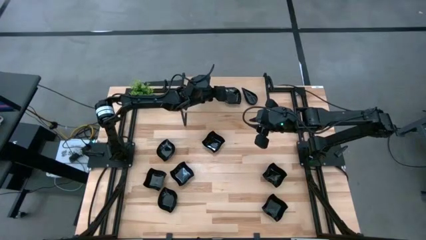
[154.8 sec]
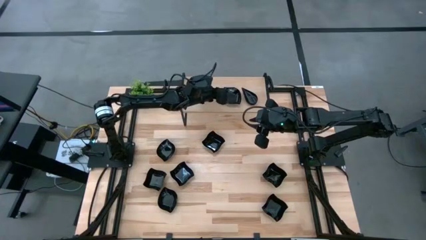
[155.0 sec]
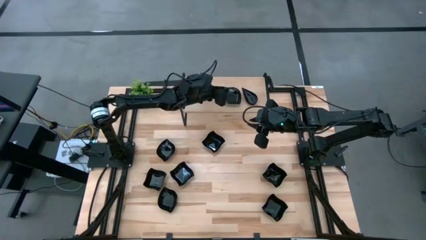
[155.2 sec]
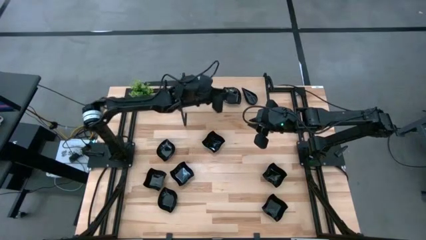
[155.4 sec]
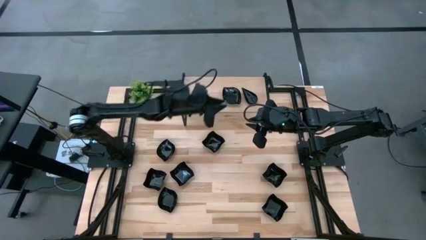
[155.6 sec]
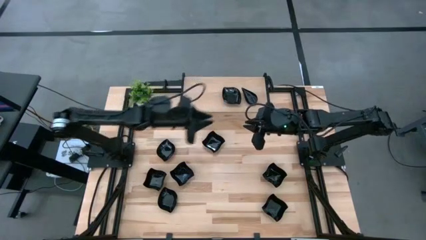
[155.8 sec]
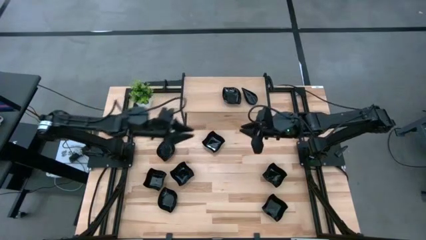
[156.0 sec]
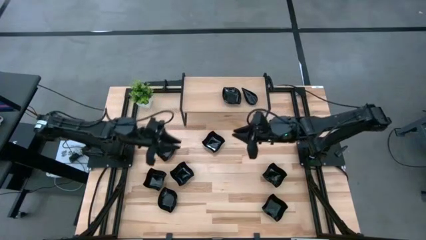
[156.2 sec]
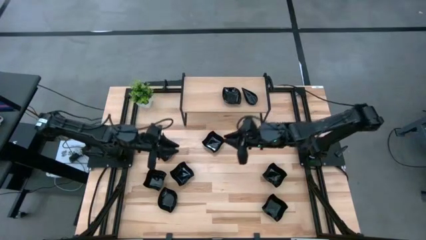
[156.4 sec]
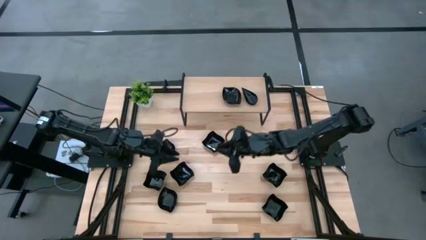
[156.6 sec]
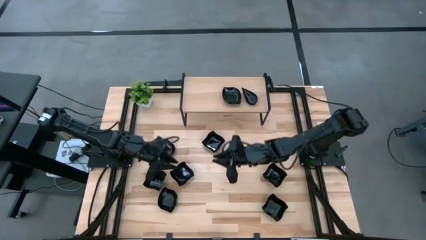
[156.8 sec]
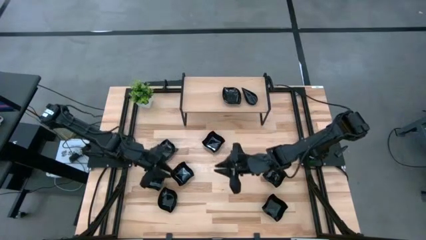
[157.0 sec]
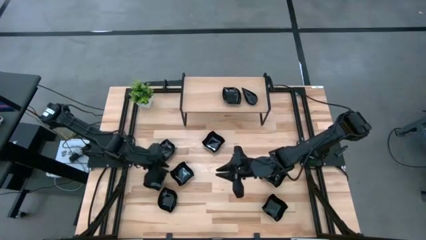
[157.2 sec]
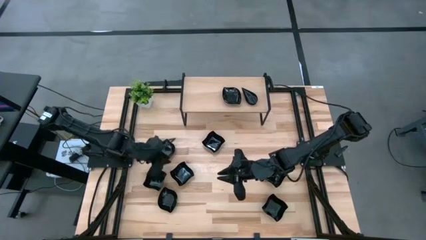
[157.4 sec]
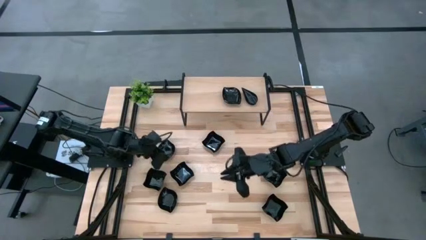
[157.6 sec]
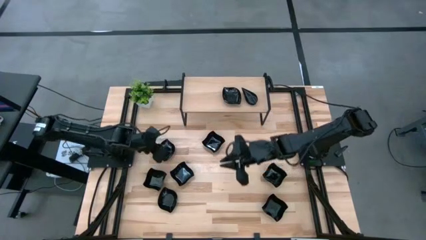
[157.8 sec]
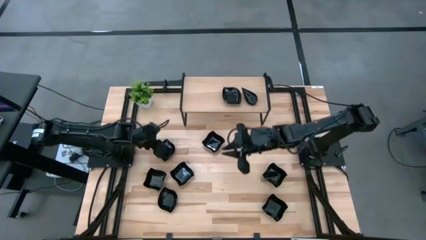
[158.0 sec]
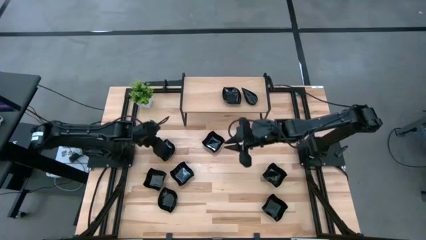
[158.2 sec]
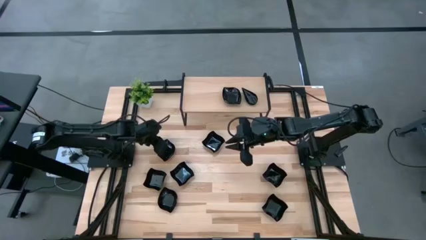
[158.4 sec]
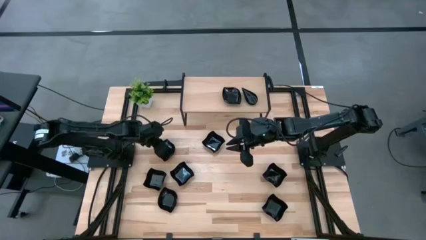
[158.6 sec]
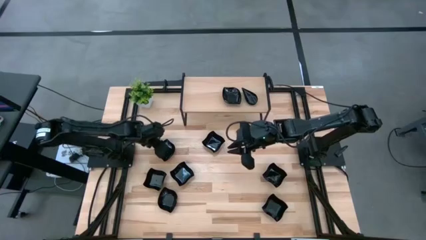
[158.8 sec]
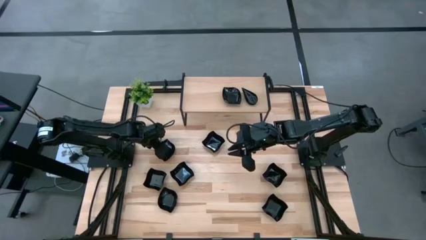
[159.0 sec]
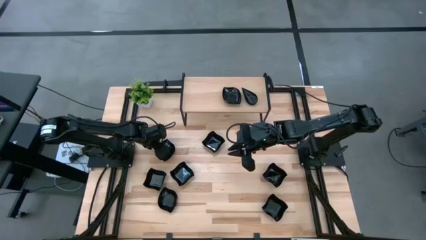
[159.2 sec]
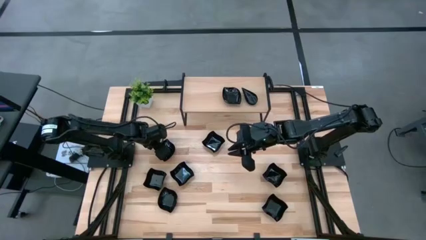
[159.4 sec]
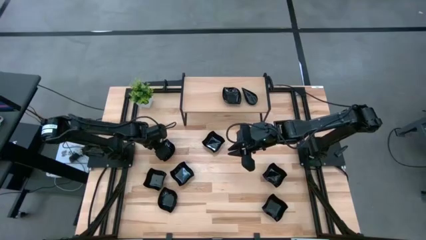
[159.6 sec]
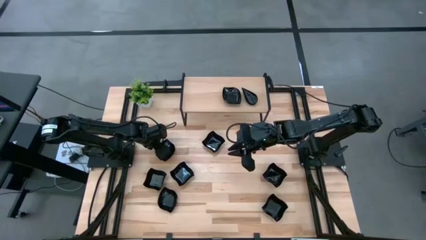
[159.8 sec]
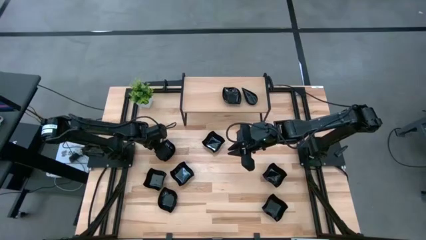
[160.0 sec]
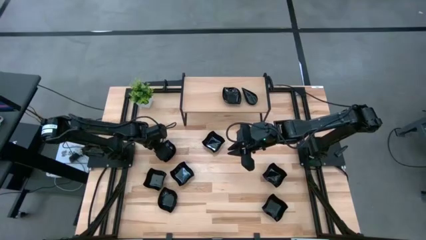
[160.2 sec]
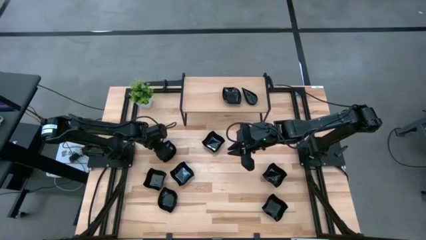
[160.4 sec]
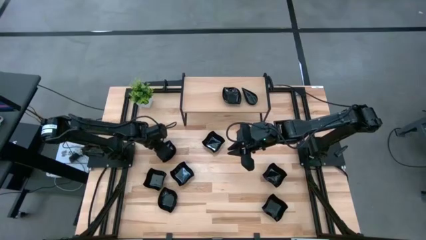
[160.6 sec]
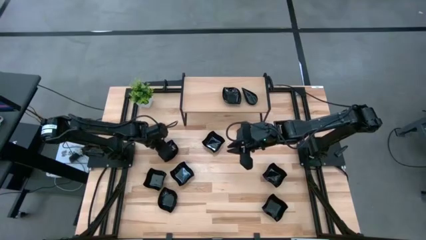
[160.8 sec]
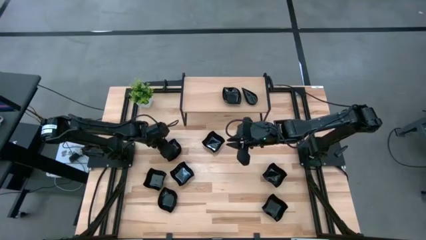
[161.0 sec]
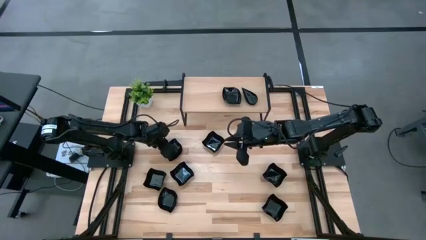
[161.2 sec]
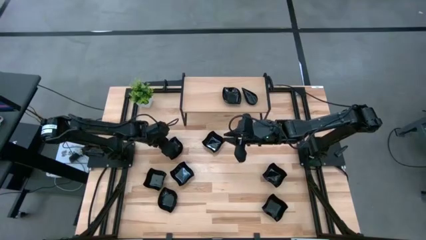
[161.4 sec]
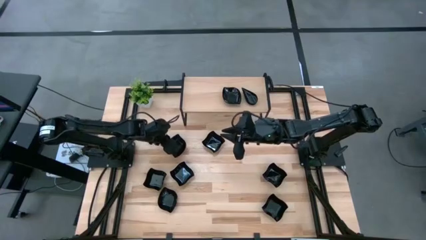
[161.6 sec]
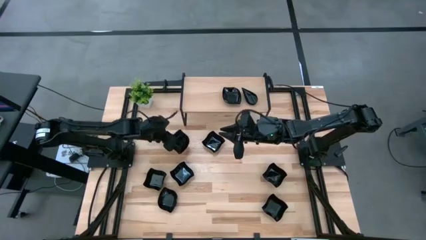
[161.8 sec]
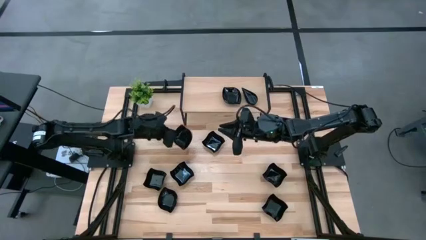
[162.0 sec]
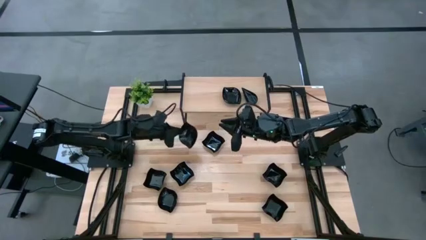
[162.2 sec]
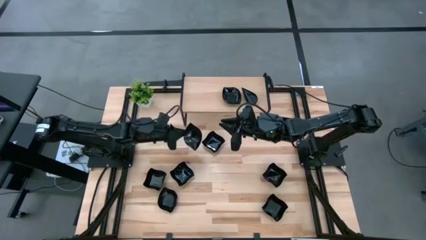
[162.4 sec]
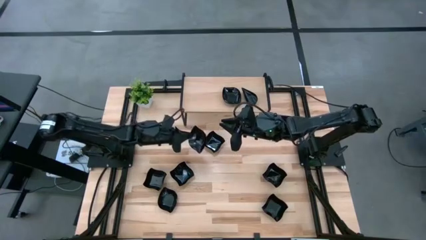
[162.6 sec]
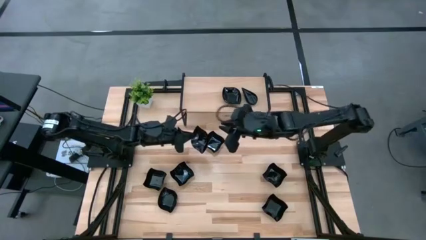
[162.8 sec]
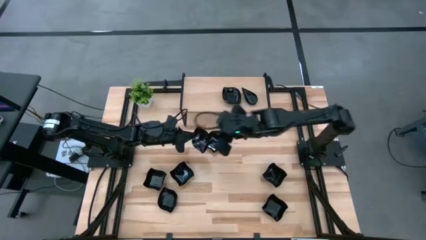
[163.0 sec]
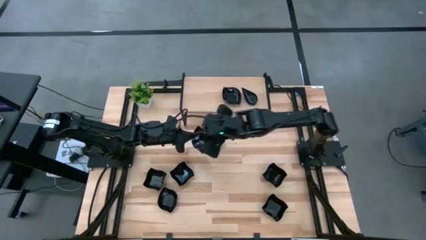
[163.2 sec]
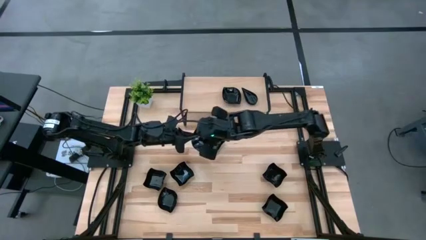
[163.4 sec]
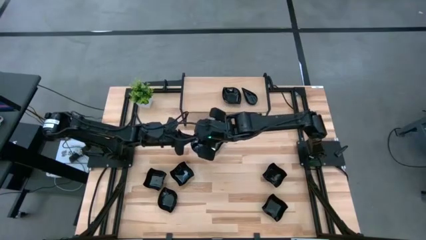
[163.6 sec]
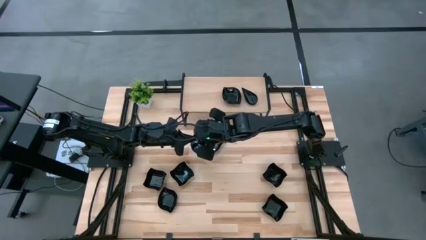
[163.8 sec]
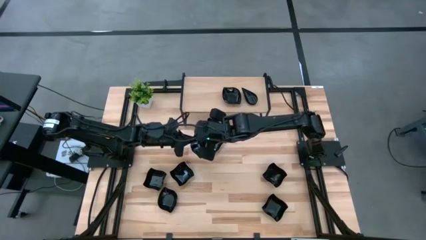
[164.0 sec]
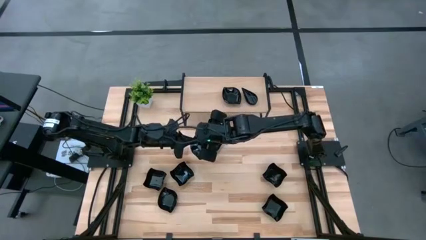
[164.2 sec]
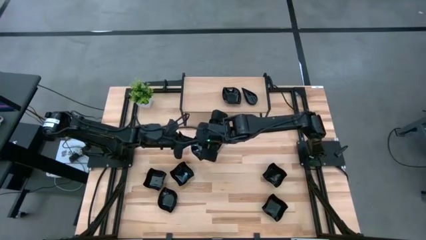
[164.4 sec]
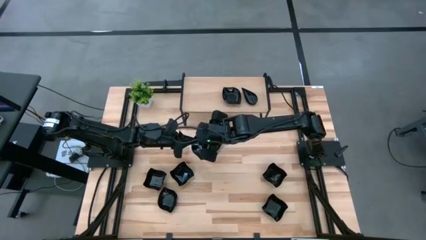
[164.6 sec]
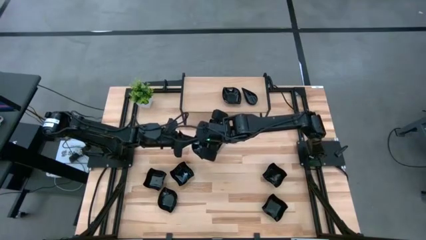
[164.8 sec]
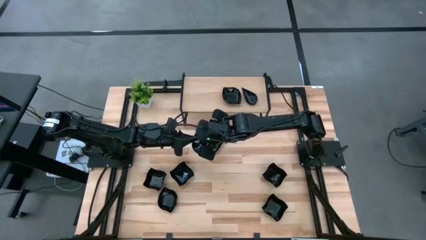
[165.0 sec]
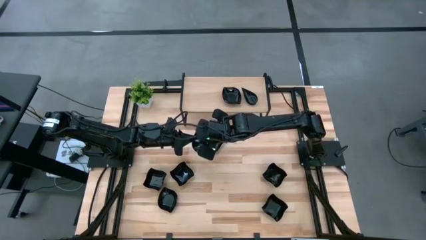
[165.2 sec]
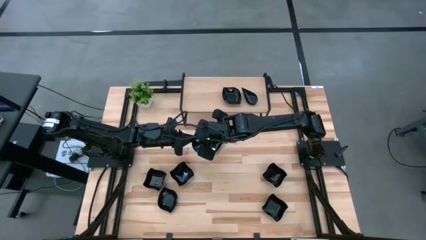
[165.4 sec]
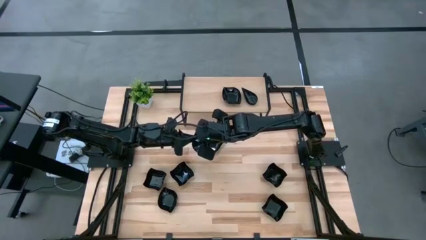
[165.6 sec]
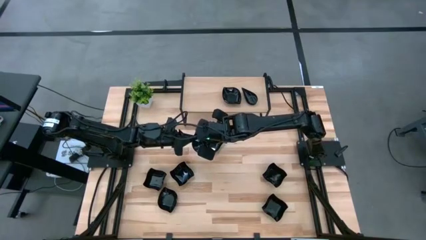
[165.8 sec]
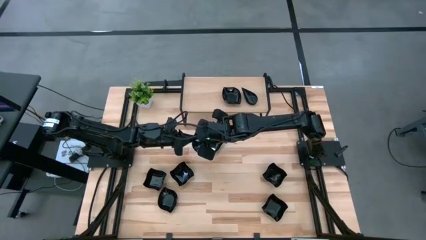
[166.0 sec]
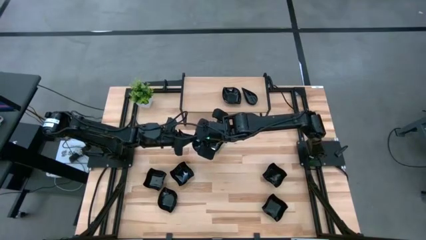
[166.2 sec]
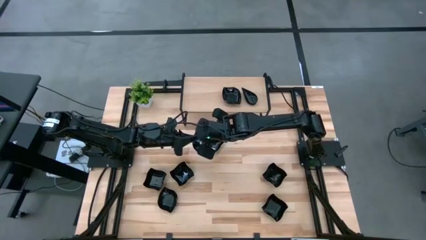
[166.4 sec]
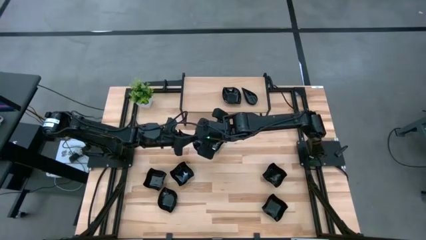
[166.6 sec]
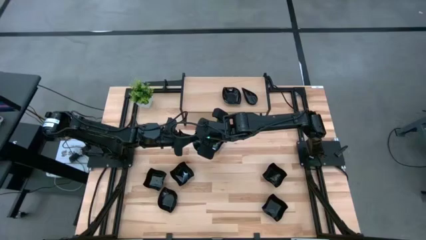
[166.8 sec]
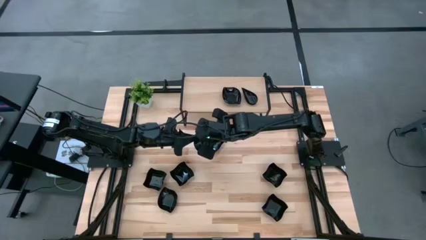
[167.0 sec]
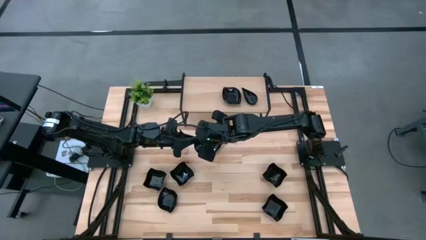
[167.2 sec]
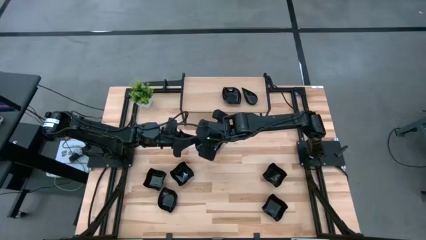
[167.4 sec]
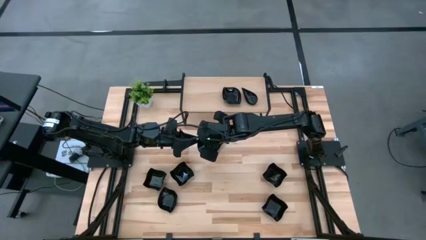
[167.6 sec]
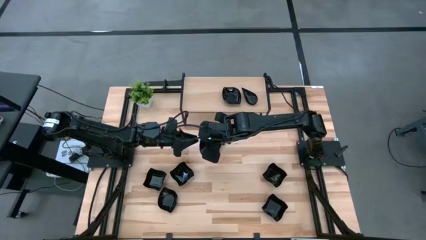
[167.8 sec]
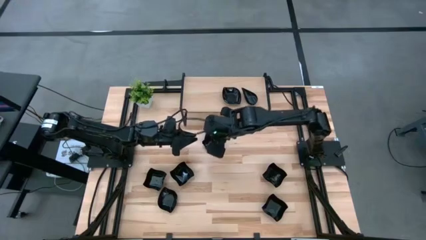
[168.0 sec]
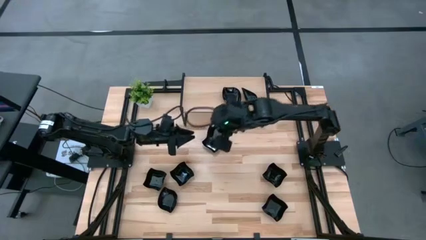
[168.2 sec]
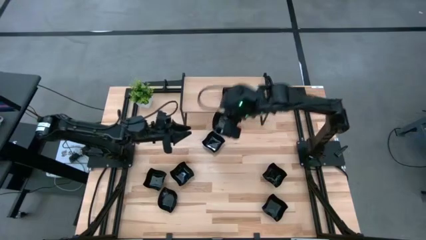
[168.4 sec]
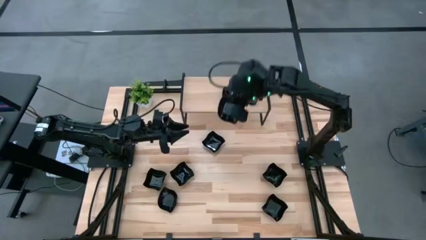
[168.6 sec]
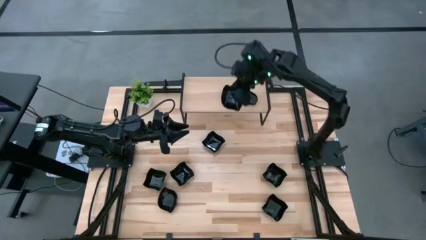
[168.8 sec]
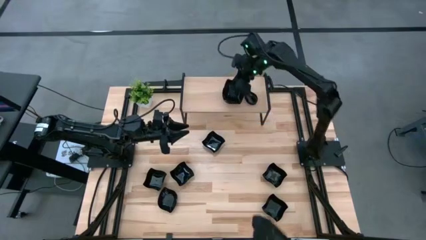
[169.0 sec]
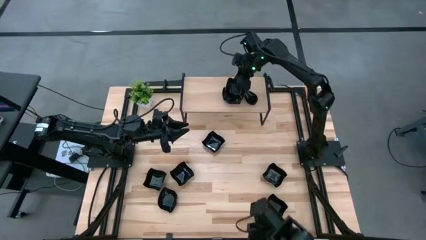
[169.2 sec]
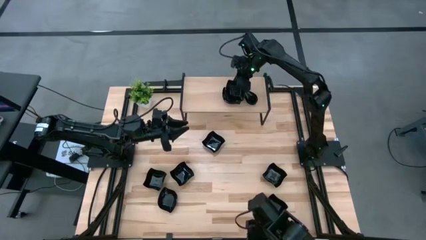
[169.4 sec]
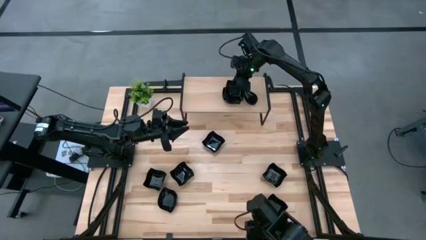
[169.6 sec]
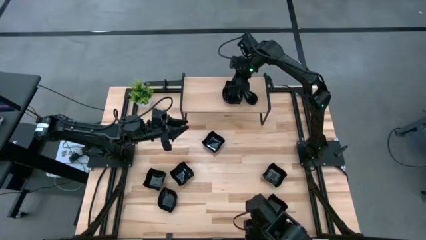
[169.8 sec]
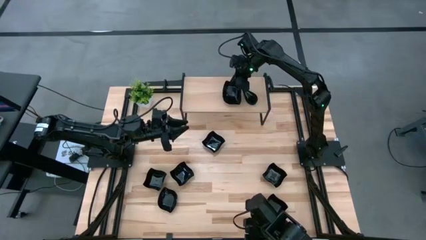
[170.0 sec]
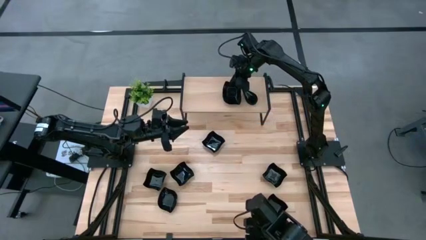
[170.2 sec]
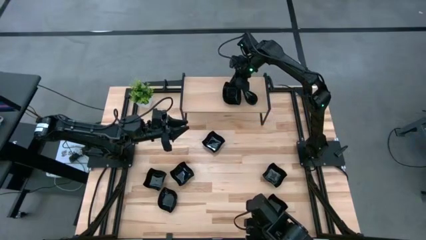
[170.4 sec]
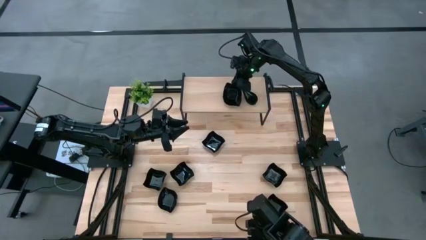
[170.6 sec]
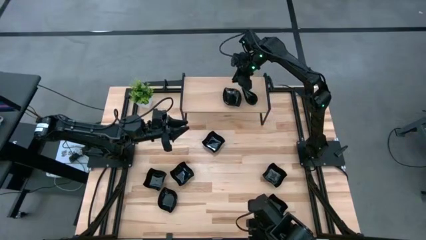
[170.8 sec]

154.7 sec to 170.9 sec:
Task: Pick & Place Mini shaped plates
Stack the black leaf shaped plate on top of the black leaf shaped plate on the shelf
